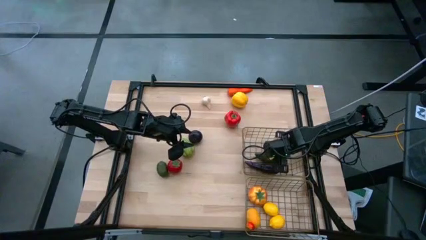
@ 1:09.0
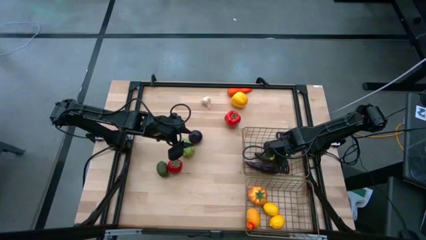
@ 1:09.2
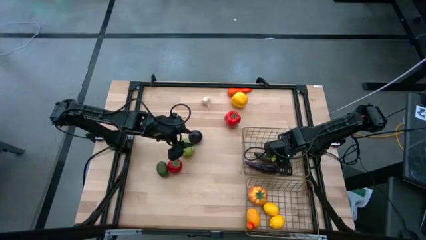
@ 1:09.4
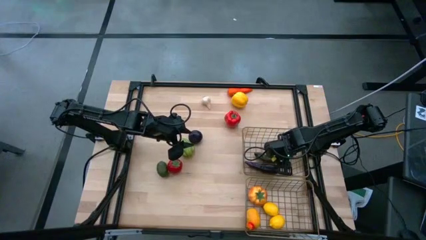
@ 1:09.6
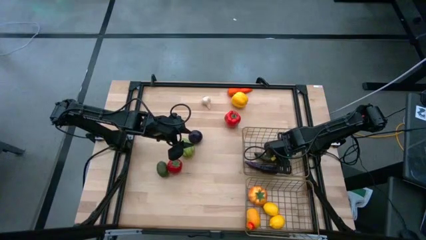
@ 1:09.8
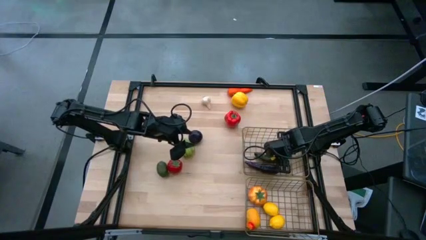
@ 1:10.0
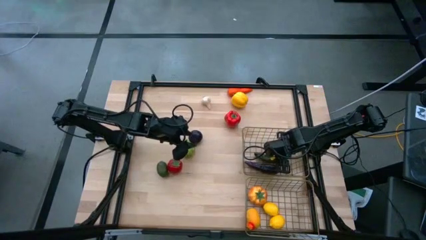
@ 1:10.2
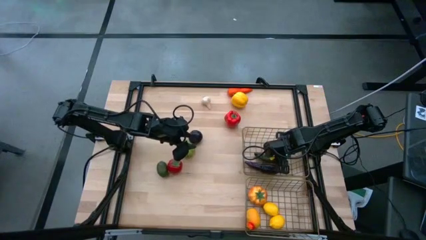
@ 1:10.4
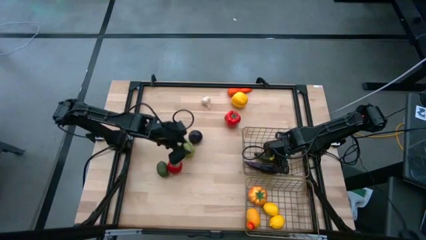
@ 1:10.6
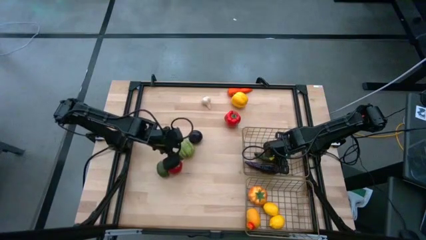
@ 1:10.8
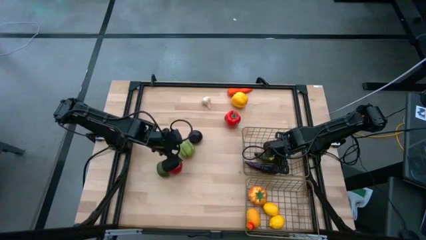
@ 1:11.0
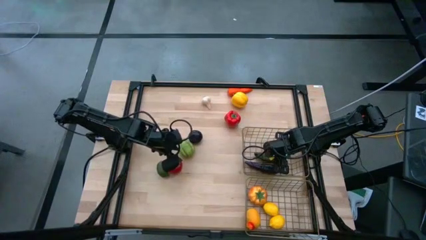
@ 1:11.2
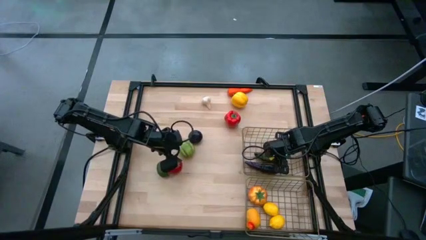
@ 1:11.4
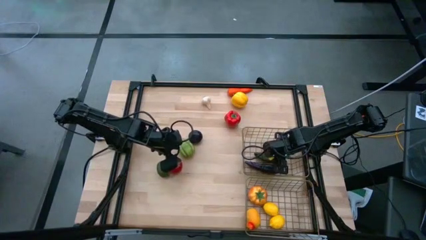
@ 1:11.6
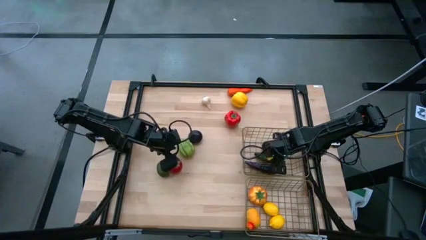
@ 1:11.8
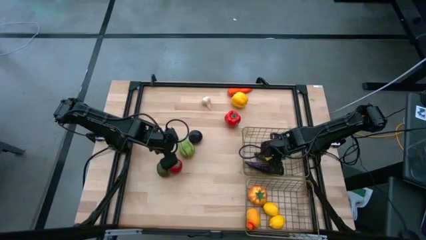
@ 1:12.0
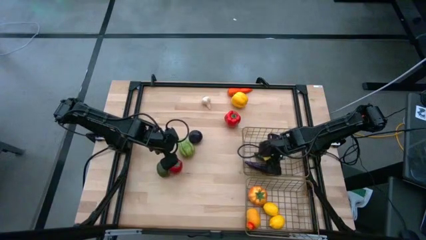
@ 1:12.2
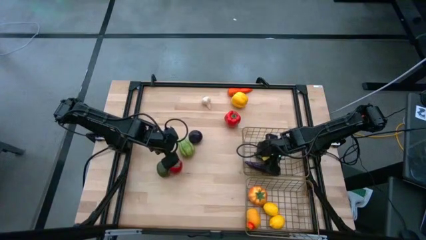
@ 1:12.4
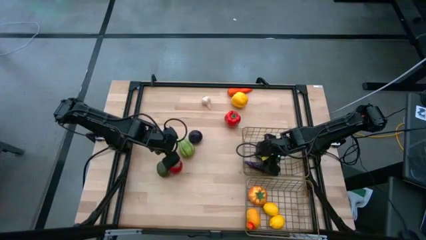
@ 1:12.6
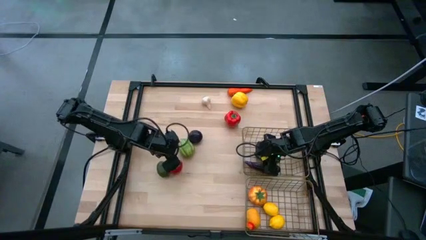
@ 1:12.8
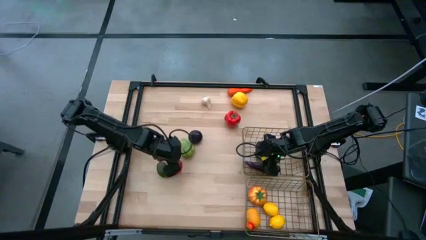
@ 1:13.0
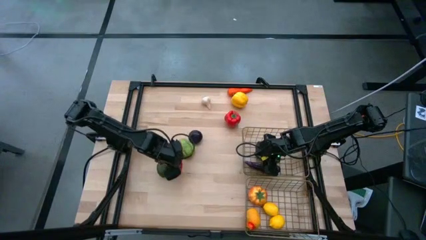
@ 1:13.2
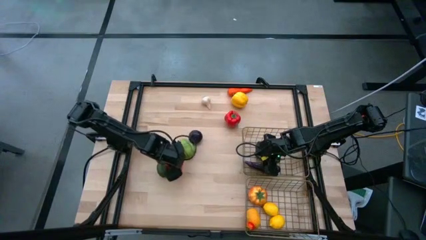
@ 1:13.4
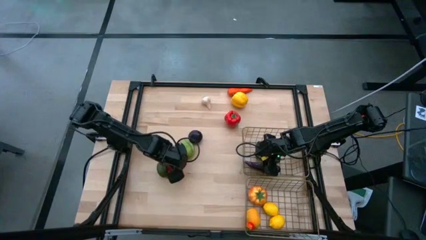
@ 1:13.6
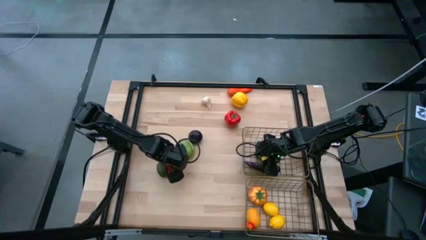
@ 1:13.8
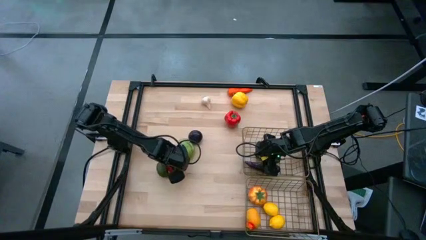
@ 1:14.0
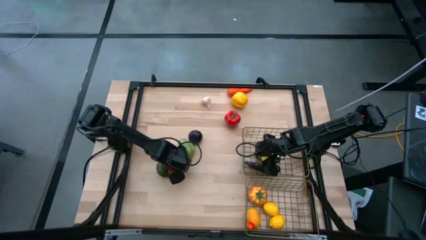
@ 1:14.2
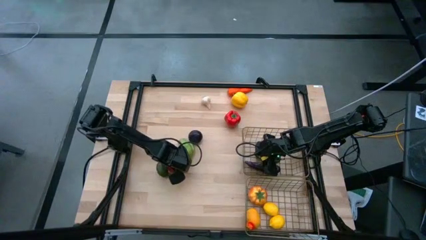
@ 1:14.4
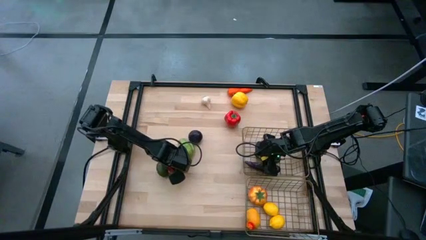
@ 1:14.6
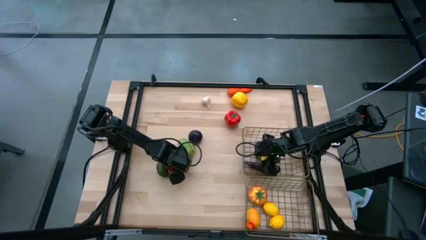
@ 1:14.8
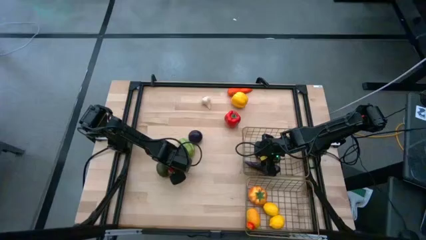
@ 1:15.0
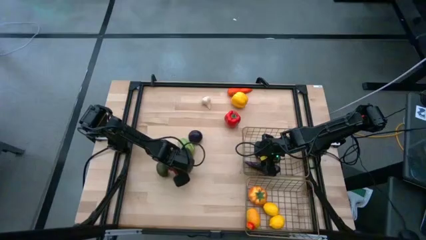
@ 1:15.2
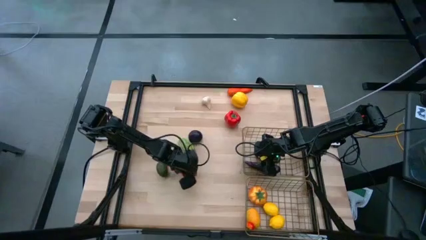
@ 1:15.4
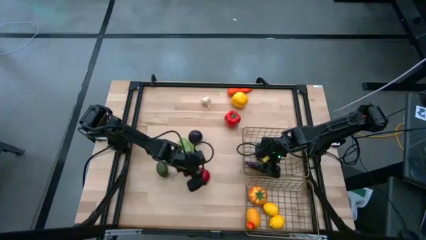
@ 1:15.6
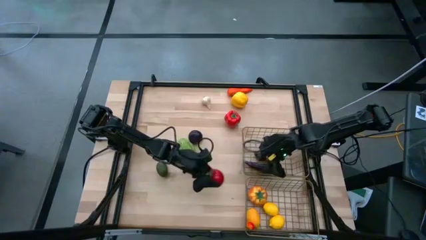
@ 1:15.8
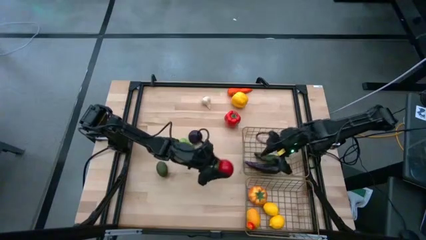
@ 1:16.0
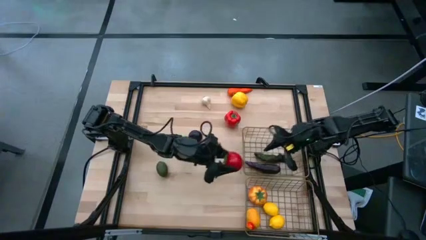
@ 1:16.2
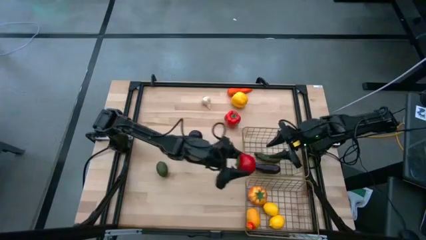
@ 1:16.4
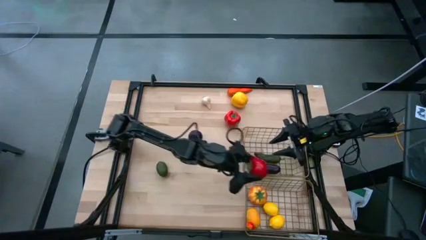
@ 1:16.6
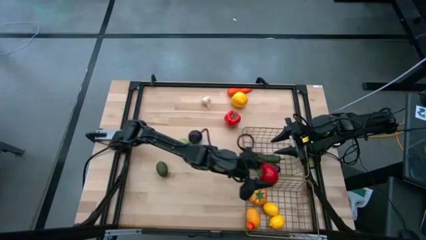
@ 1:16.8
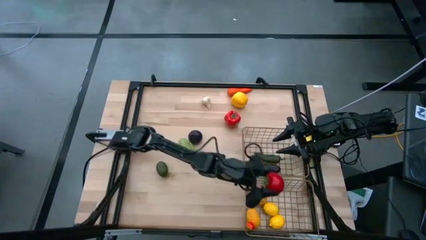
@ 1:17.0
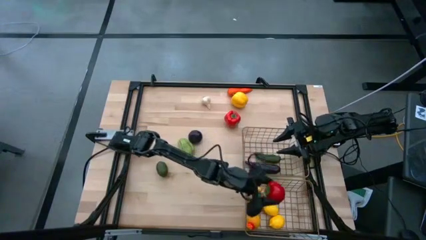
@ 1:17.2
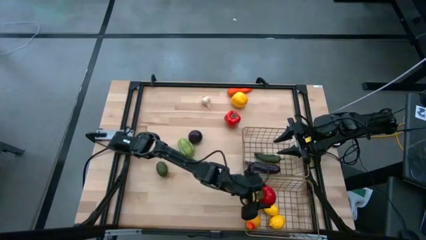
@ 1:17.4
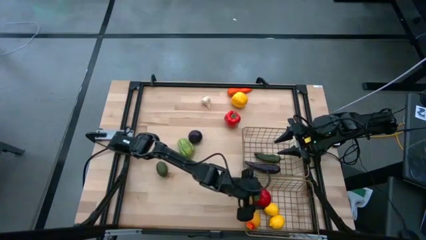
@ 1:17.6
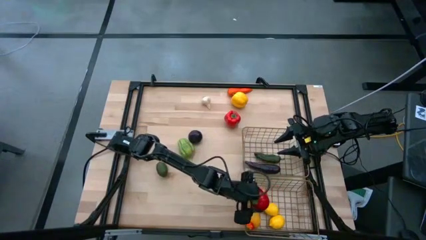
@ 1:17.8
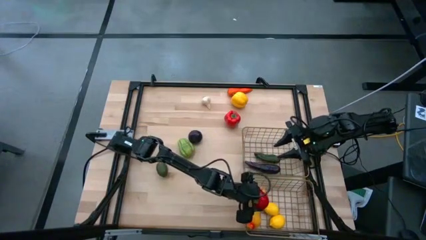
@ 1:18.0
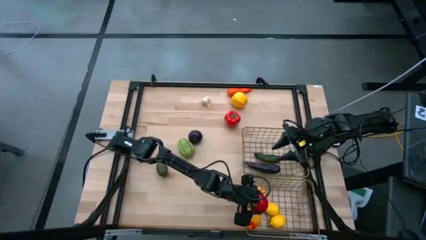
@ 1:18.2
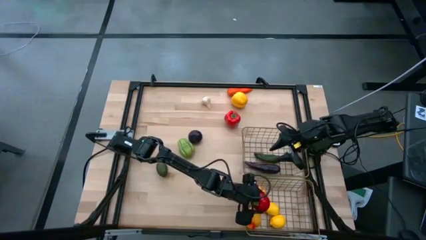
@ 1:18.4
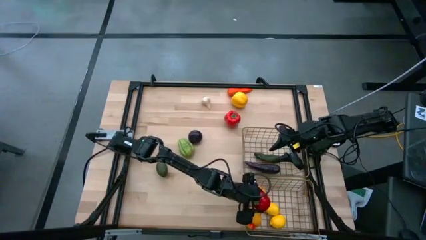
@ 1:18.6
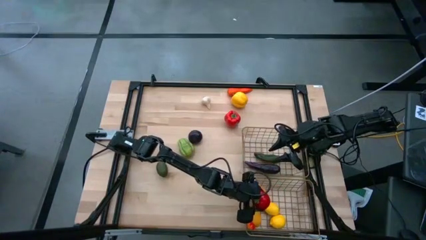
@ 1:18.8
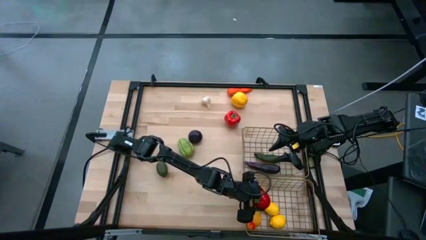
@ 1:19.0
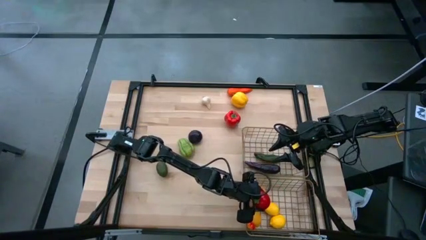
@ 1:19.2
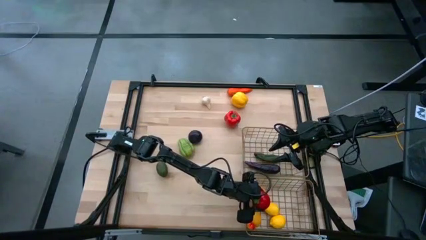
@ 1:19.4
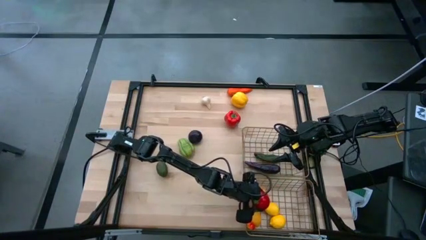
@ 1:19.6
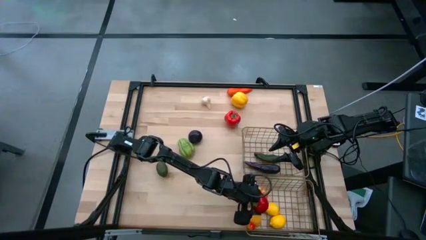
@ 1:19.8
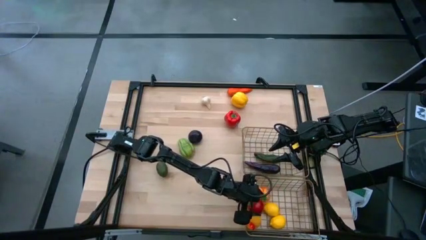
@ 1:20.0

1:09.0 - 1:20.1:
Task: Sort produce into baskets
Put the red tomato into the bottom wire basket

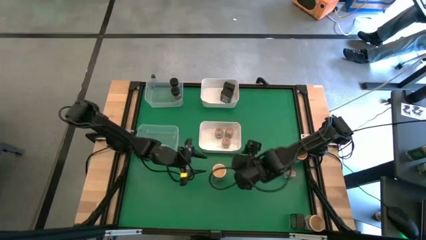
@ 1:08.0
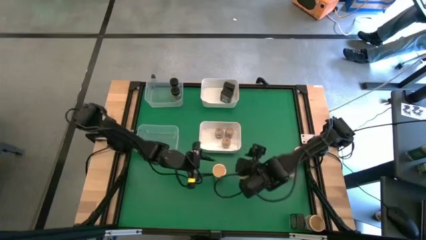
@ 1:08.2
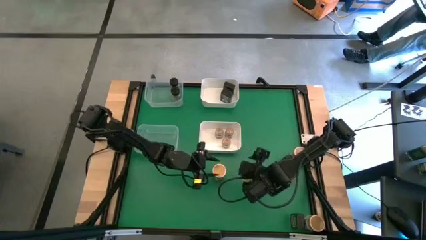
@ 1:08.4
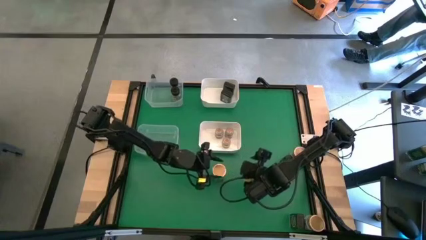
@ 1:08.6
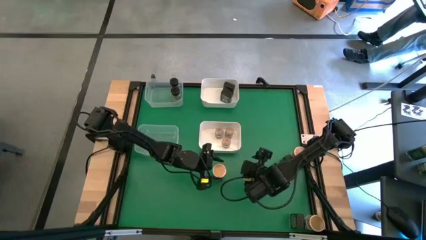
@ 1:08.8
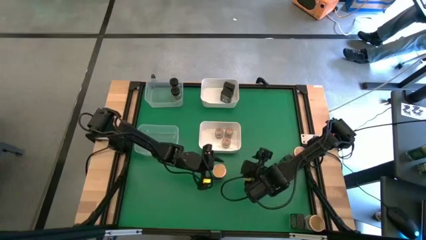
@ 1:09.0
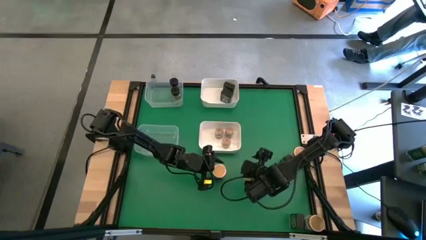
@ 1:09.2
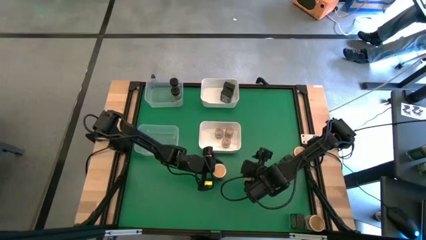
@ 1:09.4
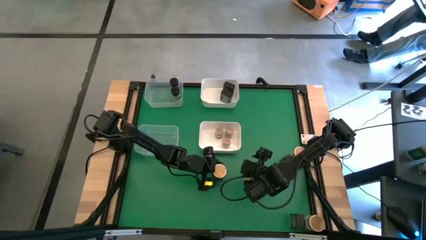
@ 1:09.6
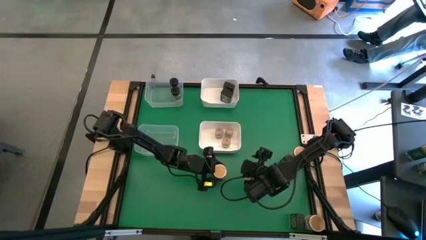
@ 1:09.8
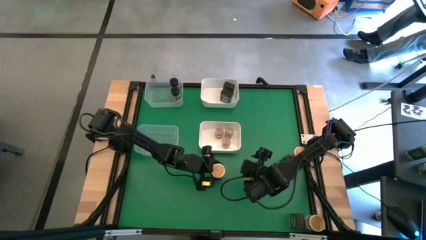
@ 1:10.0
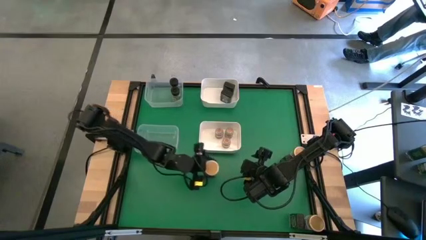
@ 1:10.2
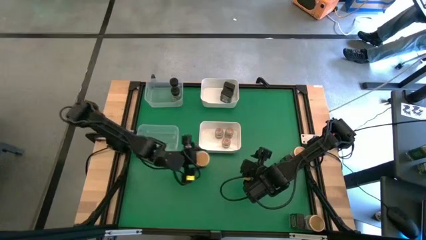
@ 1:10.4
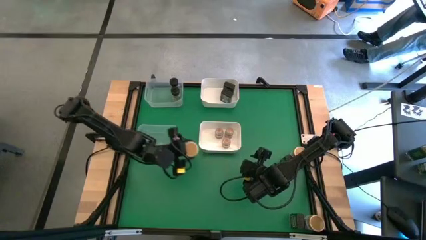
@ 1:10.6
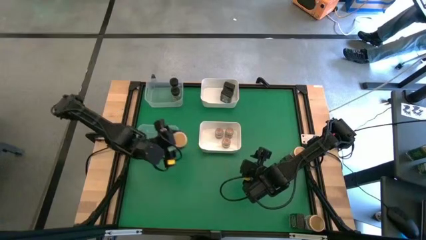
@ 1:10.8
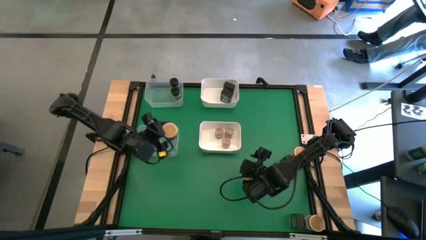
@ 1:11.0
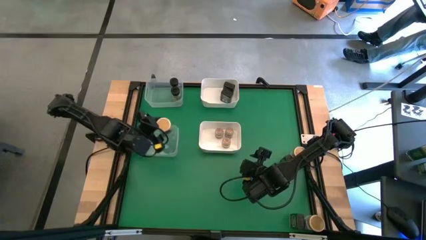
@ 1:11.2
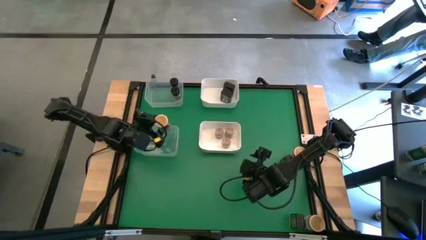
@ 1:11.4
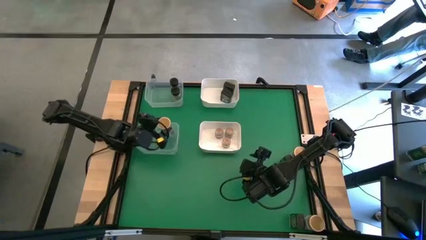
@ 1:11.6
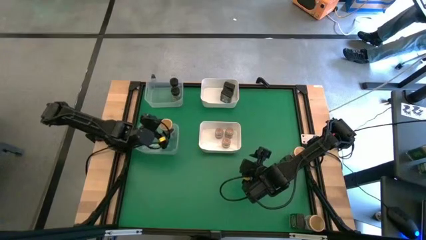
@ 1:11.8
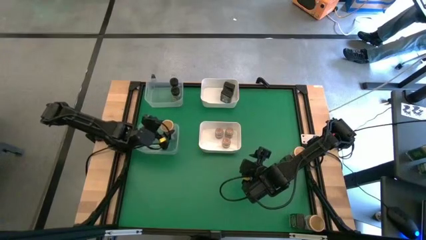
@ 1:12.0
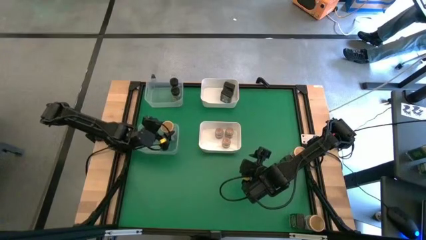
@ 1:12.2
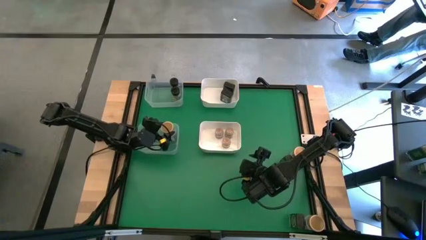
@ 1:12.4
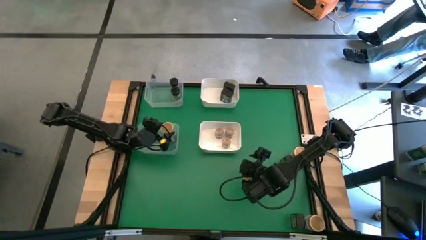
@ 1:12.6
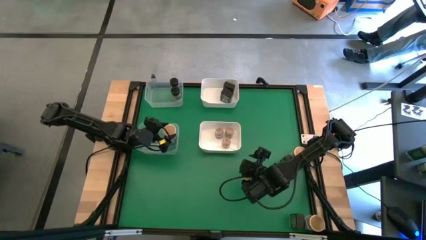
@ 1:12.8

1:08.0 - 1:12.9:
Task: Sort spices by type
Put the center light brown seasoning bottle into the bottom transparent bin
